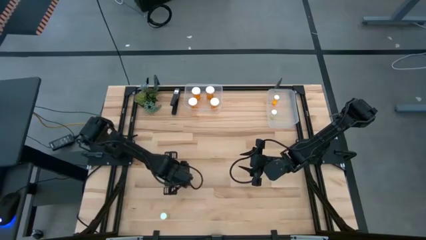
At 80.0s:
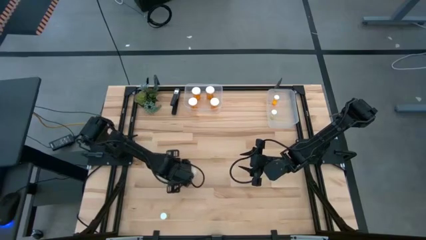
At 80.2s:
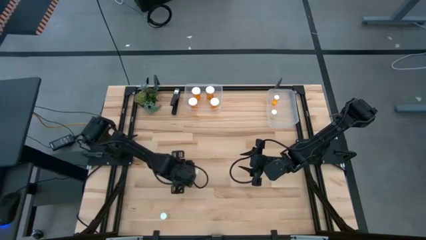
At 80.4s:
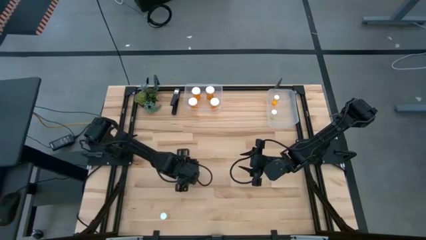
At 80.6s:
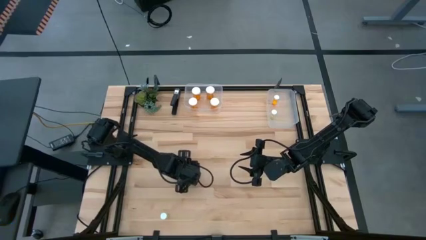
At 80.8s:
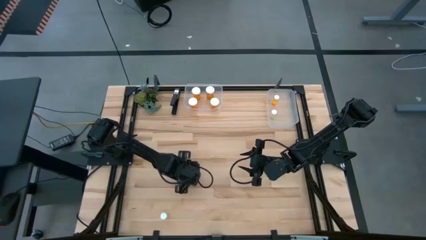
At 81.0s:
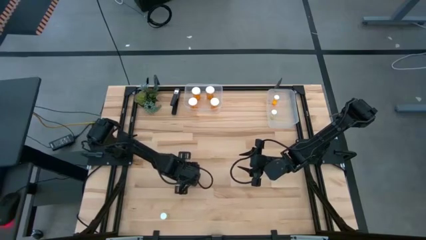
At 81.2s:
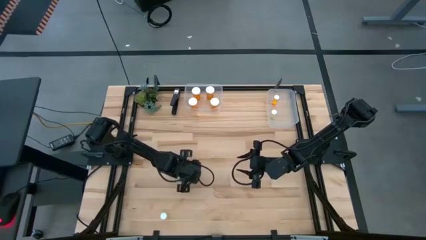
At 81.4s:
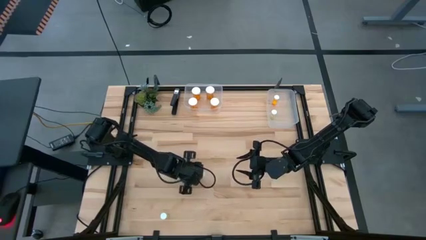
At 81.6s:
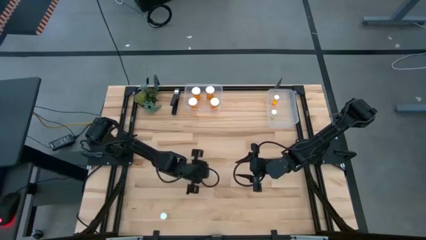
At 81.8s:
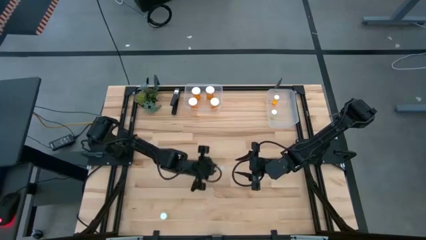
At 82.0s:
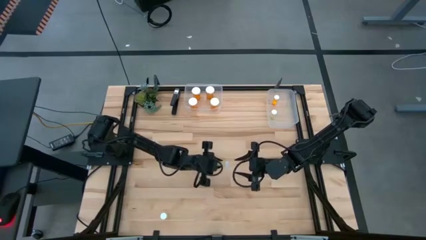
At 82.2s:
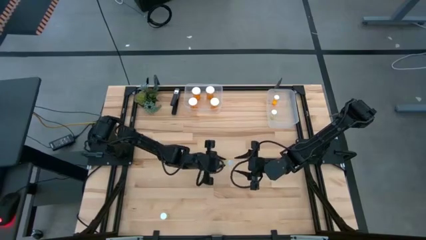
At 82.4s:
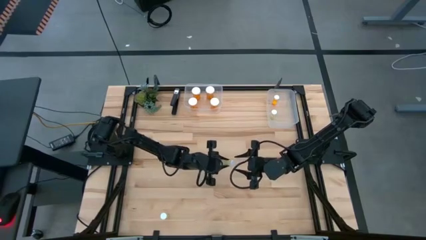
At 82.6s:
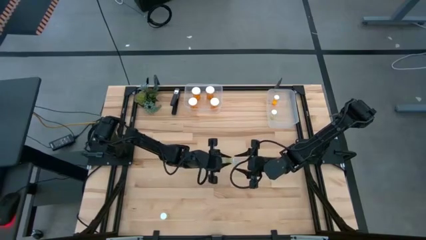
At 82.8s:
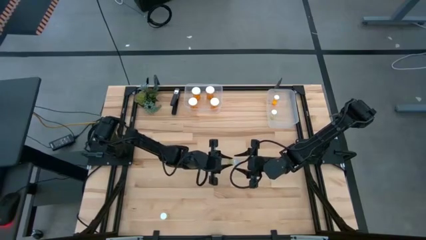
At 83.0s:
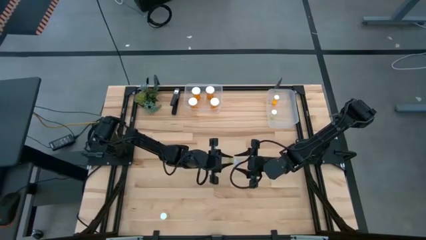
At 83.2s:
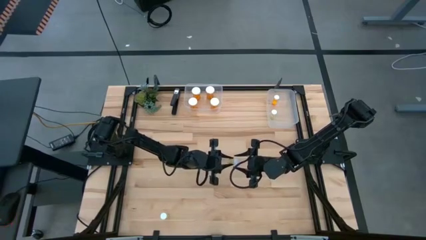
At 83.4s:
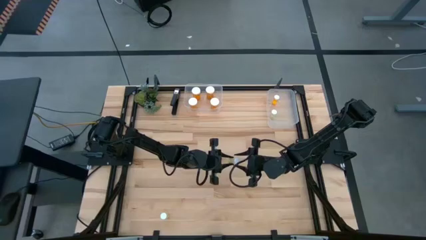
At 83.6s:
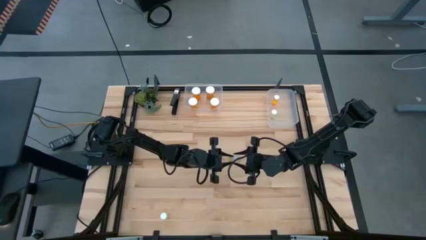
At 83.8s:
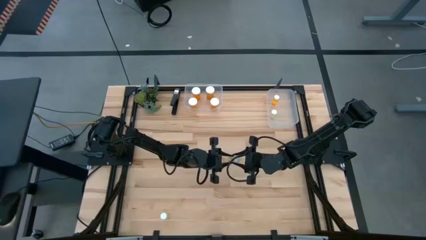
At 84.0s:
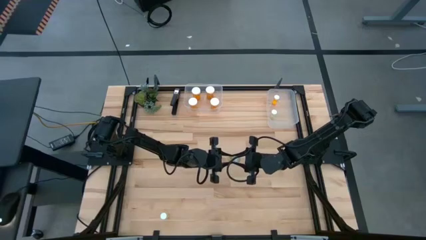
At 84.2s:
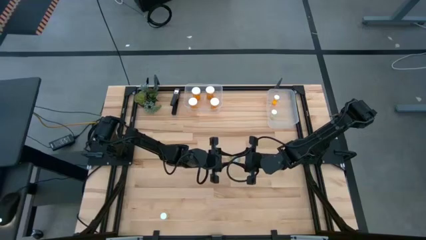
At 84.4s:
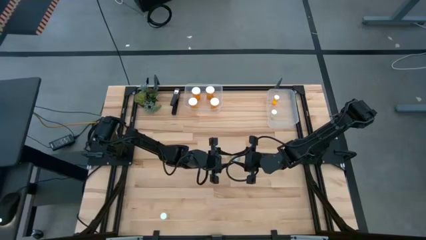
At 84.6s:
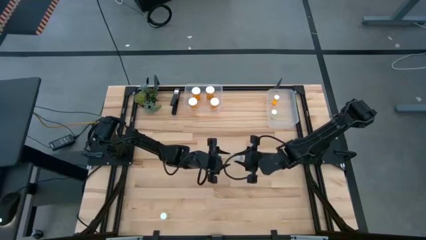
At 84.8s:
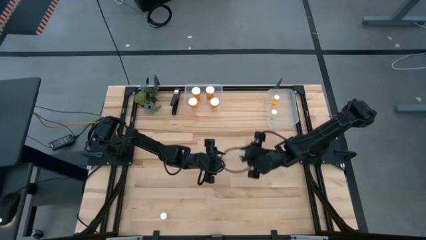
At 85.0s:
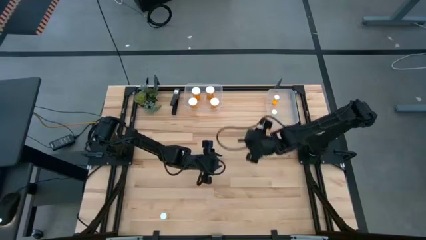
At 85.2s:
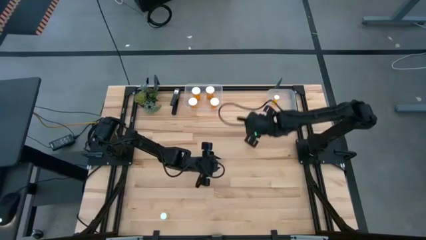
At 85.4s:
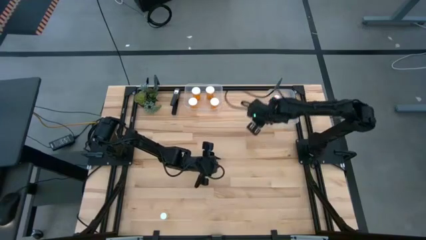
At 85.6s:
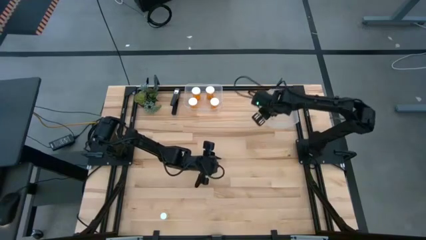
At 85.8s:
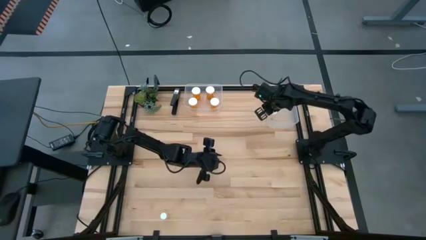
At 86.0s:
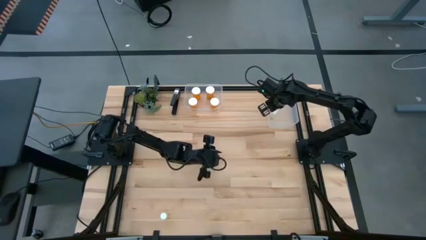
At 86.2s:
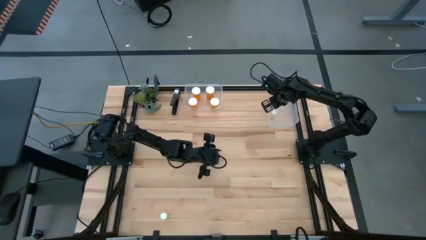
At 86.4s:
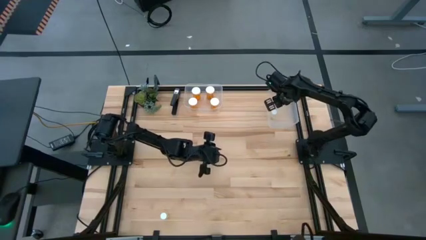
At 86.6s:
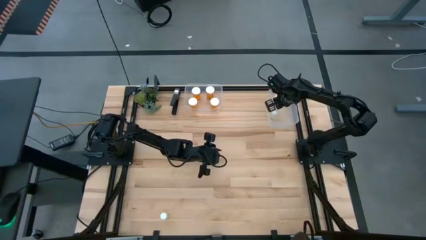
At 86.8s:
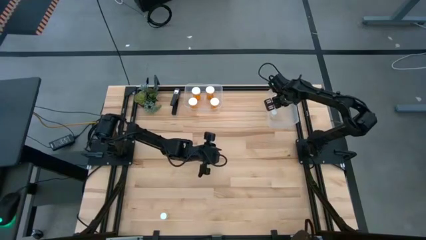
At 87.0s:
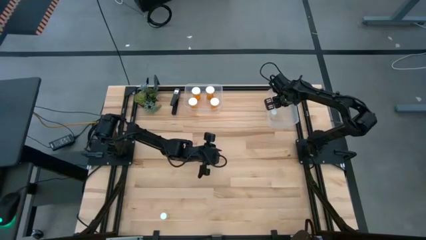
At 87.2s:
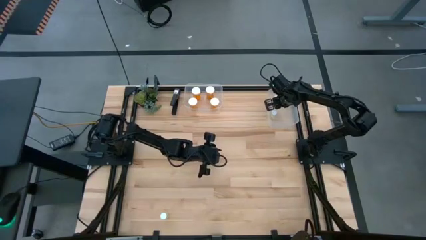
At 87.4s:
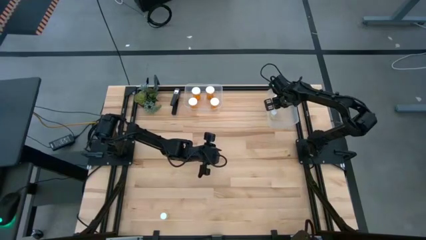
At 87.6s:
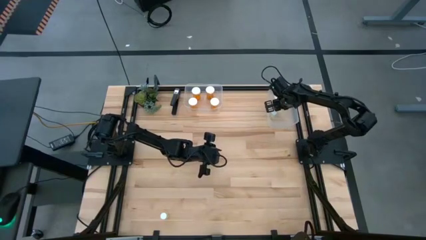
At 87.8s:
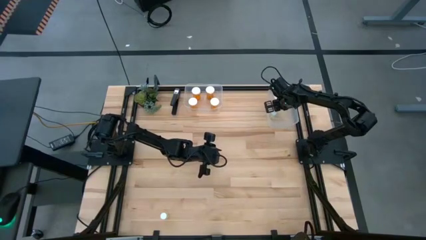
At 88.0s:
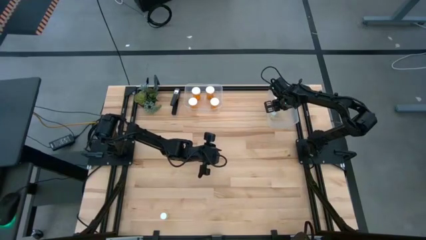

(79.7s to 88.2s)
Task: Pick and place medicine bottles into bin by pill shape (circle, oval)
Put the top small yellow pill bottle into the right transparent bin

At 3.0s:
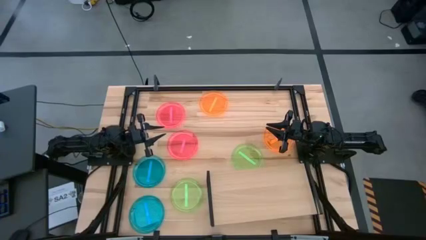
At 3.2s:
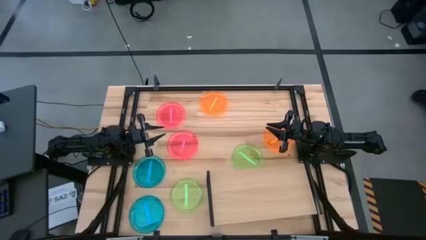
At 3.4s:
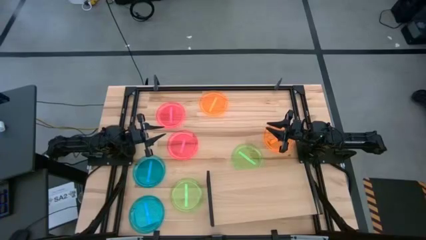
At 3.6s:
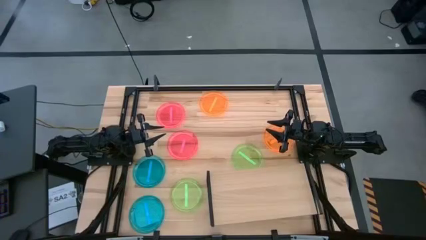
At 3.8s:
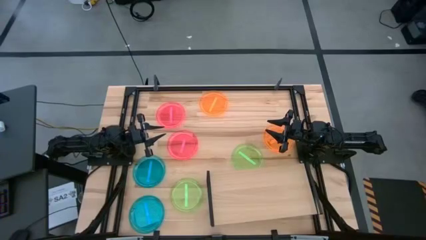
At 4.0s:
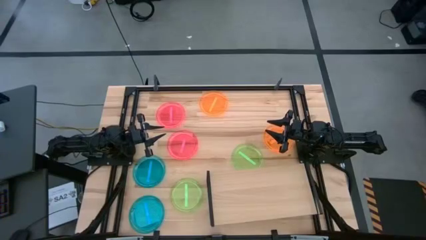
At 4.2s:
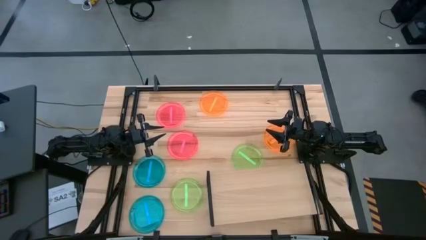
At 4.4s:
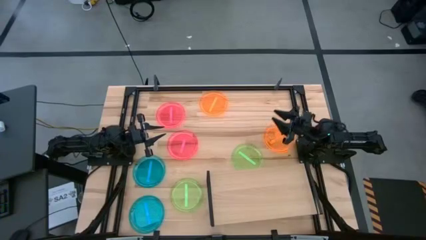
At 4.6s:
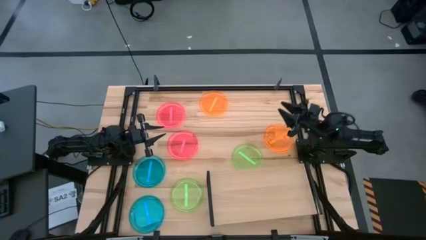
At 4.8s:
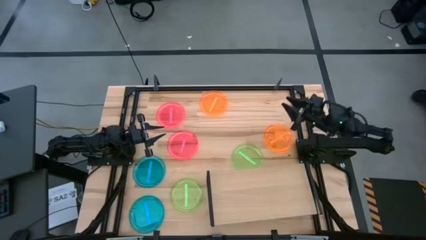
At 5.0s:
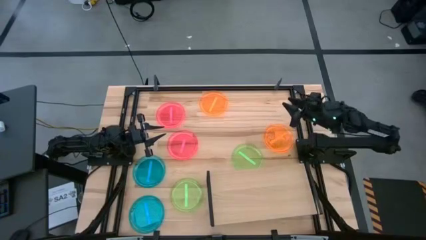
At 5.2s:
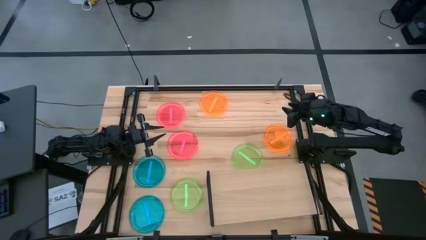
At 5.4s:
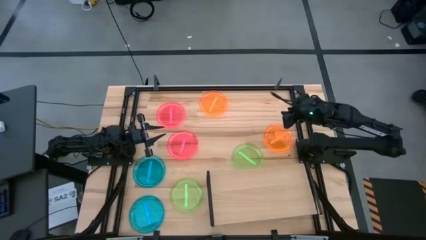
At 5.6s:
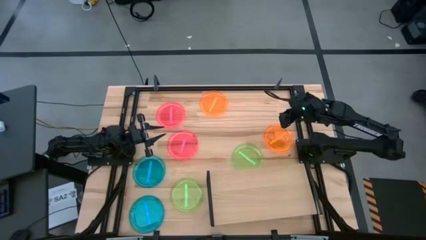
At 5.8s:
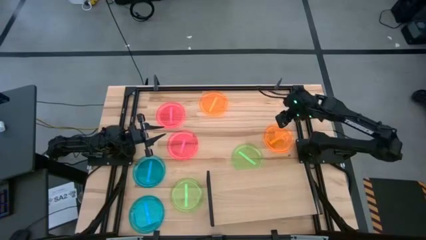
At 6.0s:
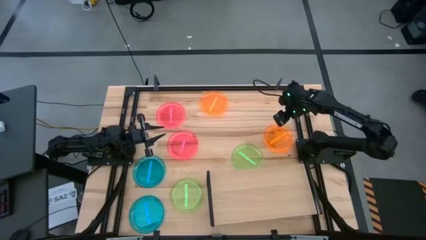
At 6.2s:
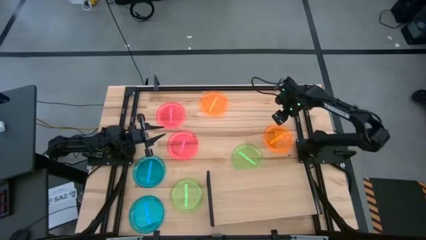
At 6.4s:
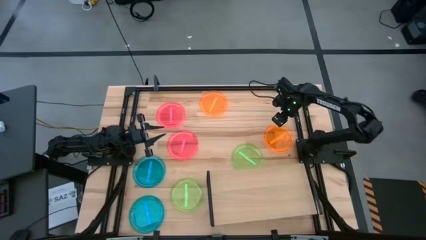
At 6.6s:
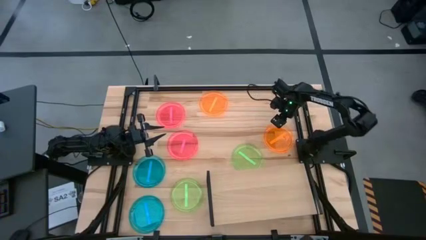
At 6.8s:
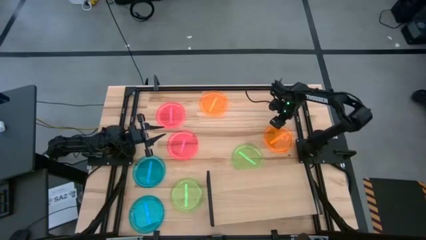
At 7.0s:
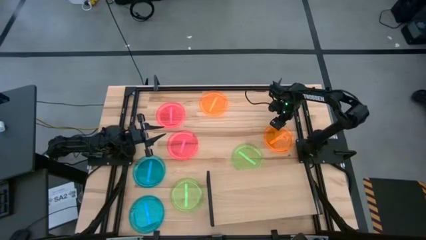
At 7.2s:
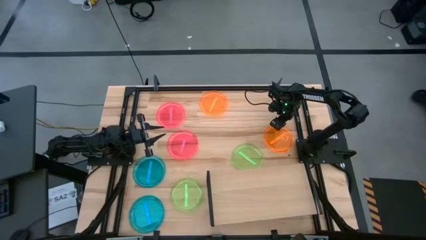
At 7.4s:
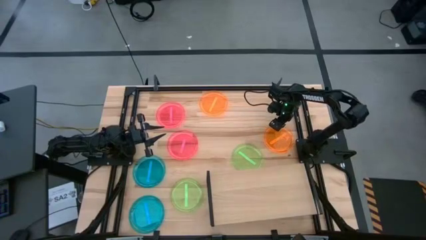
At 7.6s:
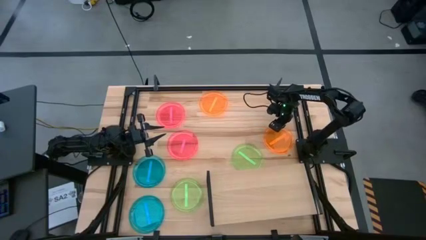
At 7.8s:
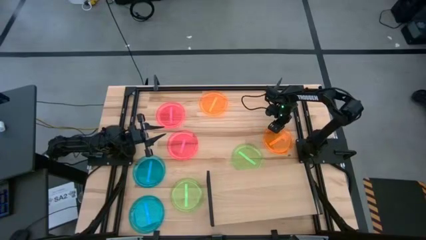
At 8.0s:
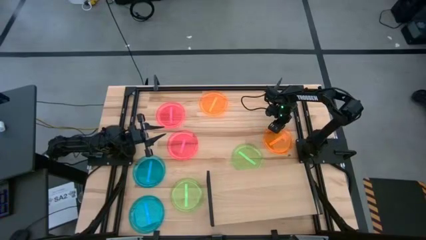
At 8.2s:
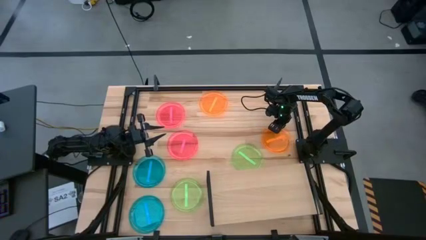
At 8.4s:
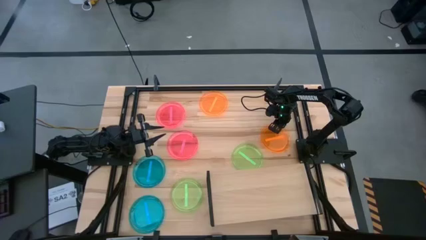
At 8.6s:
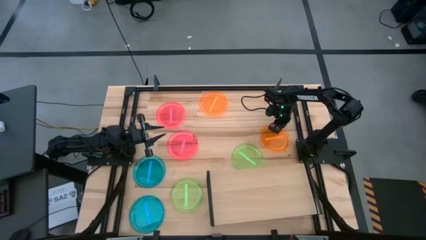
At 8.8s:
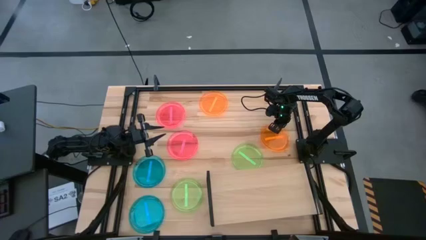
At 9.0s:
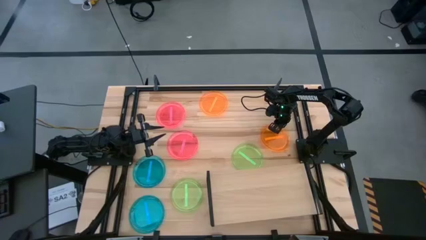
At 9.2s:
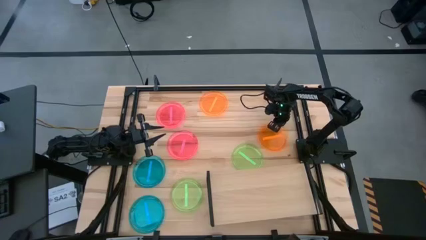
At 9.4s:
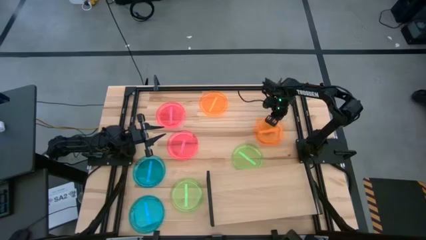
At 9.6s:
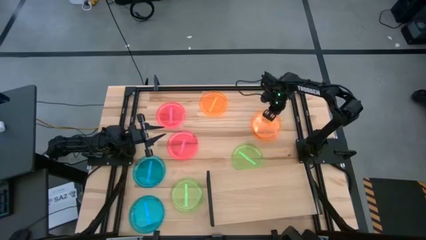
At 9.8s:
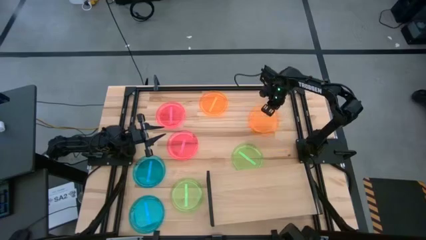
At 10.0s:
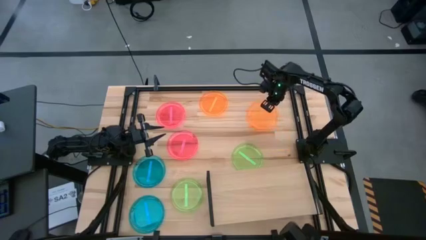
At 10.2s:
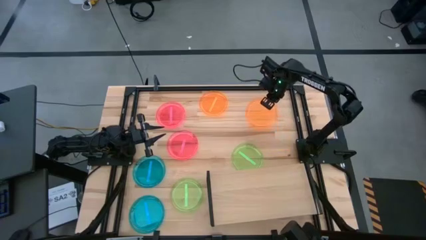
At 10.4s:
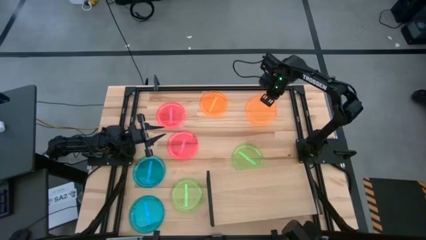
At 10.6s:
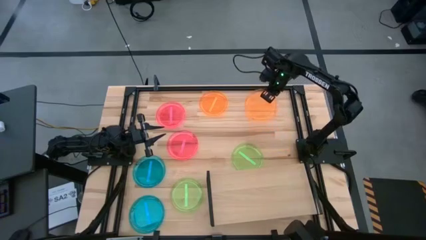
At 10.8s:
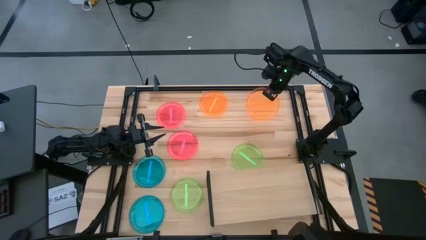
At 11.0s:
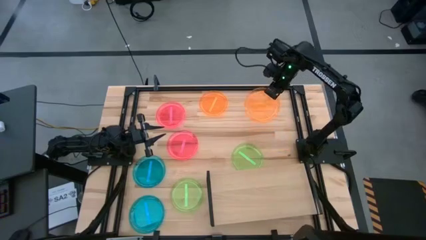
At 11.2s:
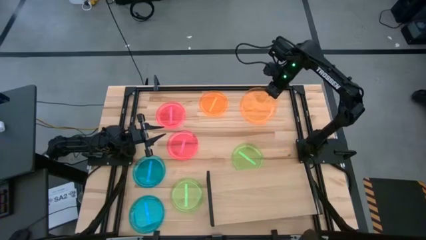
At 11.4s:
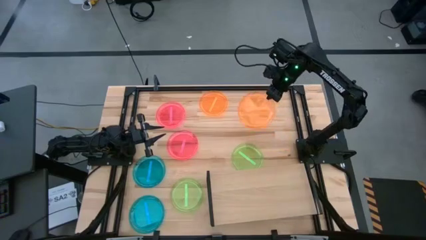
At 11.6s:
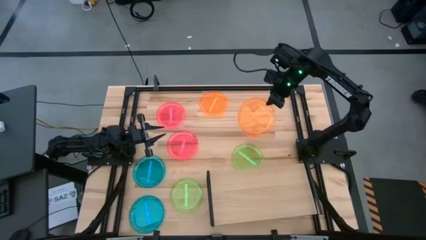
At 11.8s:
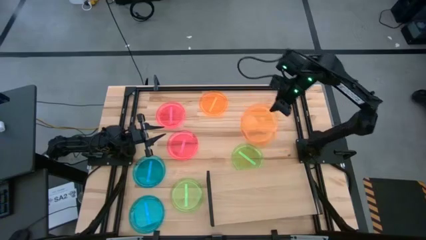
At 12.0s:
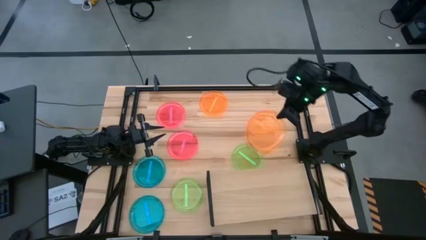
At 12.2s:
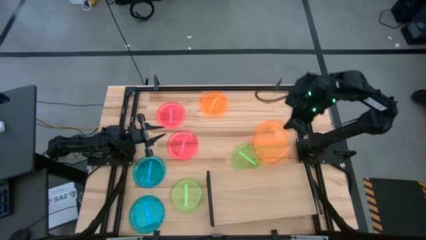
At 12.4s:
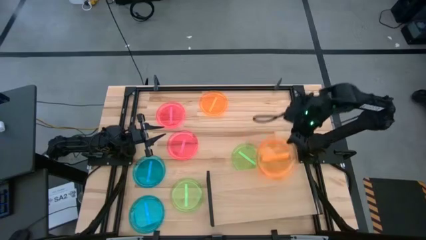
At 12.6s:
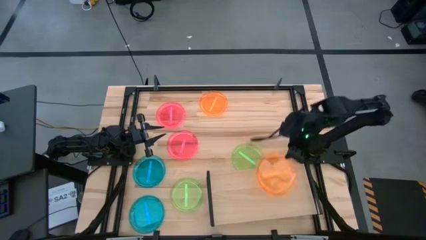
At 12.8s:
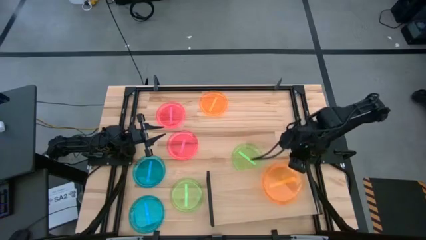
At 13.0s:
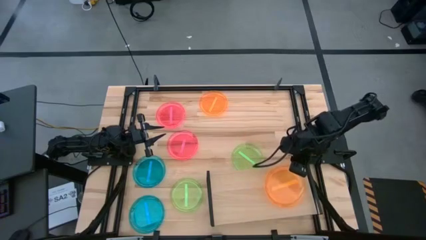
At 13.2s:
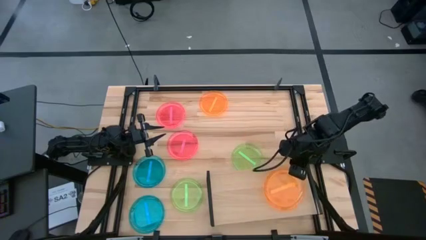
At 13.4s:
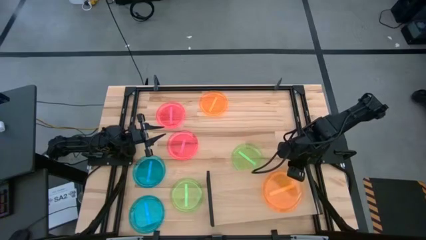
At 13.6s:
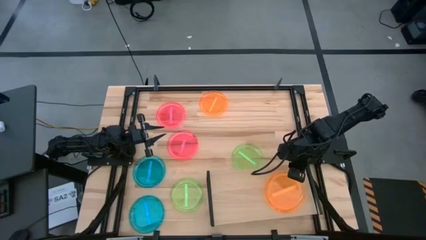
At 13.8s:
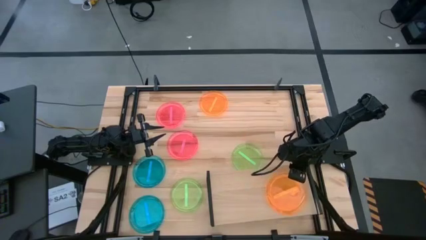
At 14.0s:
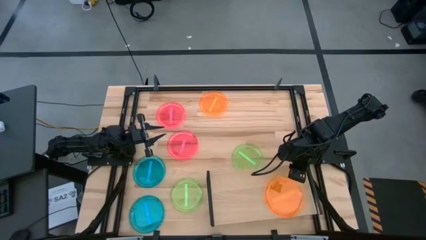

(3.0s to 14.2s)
Task: Place and stack plates onto a shelf
Put the right orange plate on the shelf
